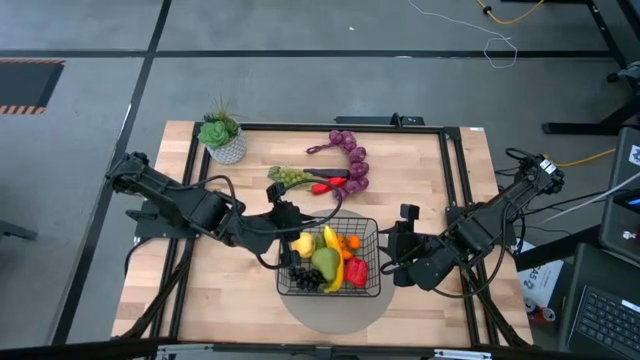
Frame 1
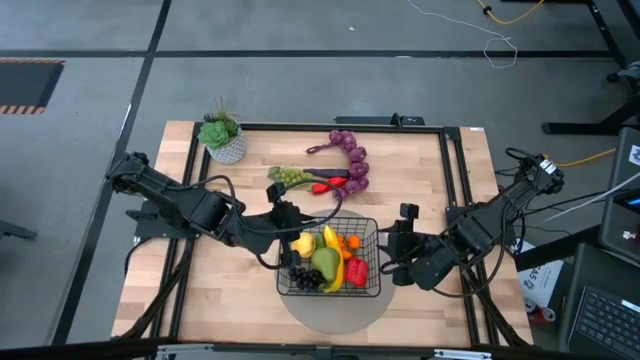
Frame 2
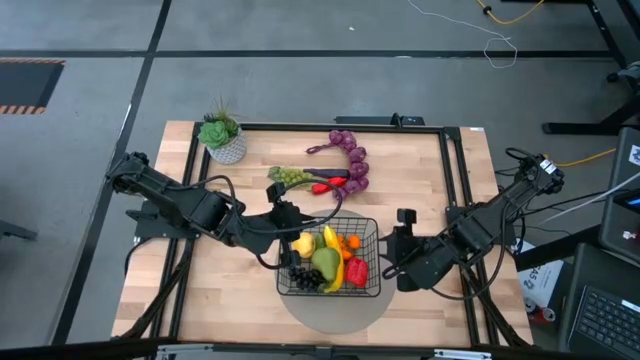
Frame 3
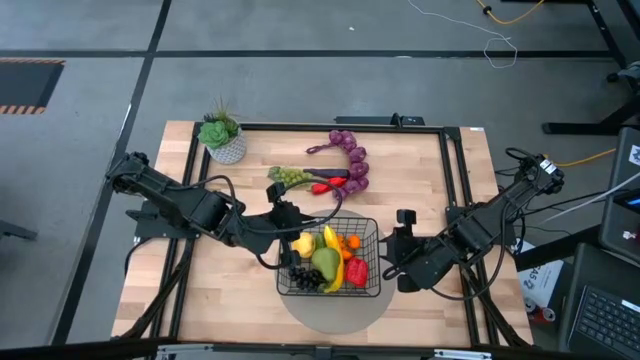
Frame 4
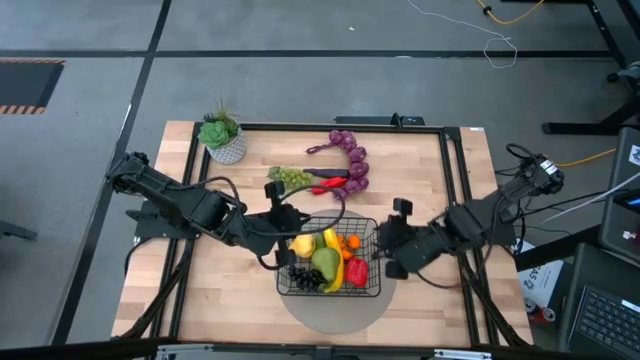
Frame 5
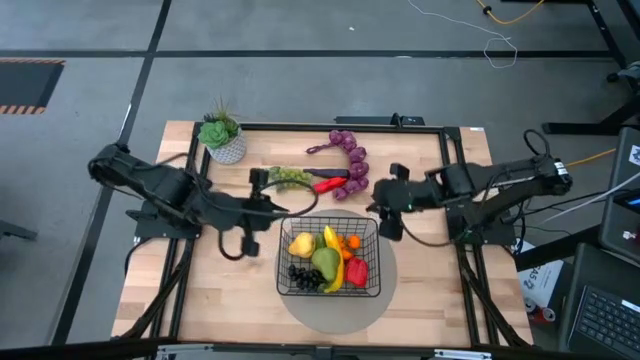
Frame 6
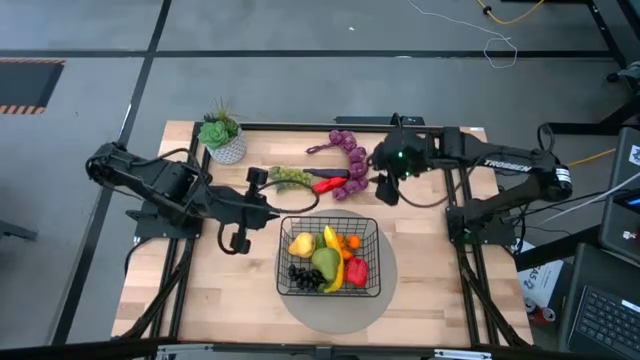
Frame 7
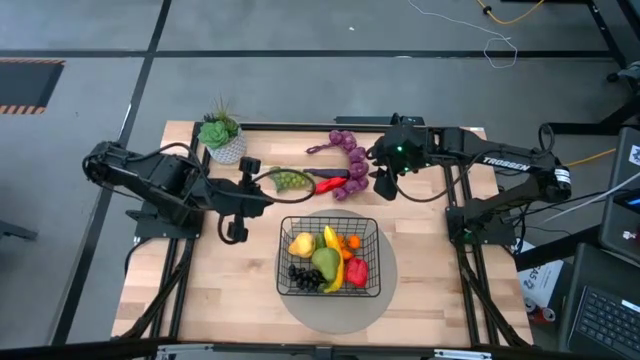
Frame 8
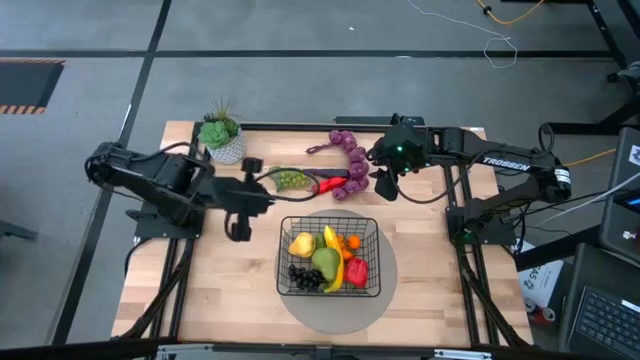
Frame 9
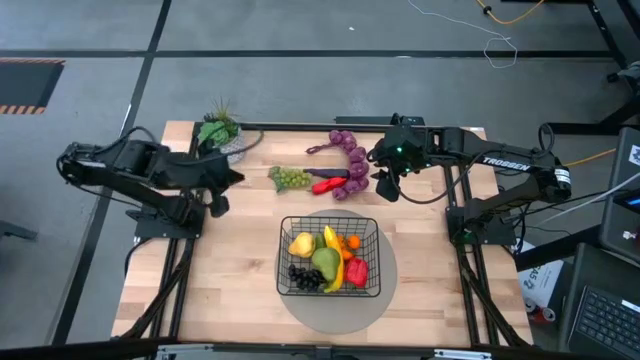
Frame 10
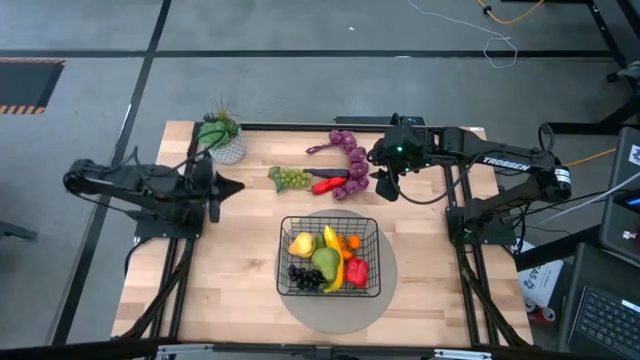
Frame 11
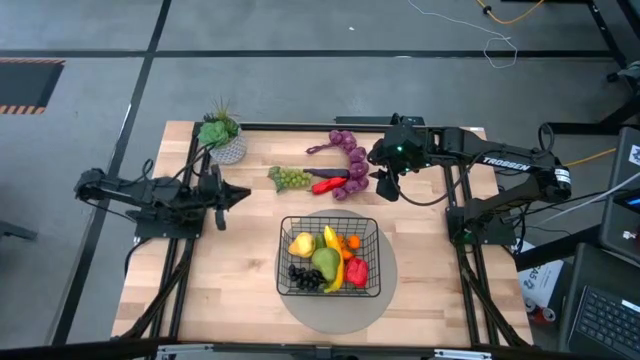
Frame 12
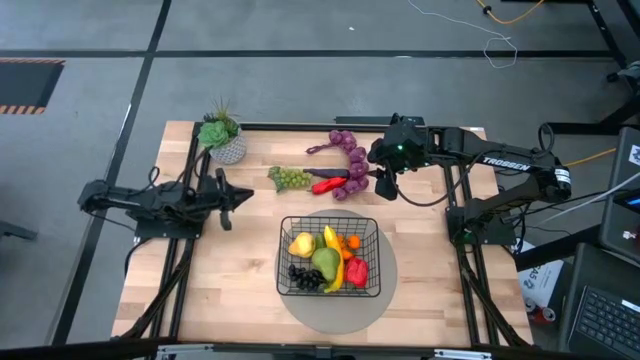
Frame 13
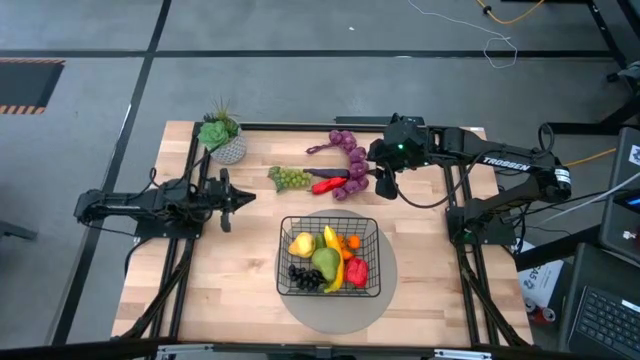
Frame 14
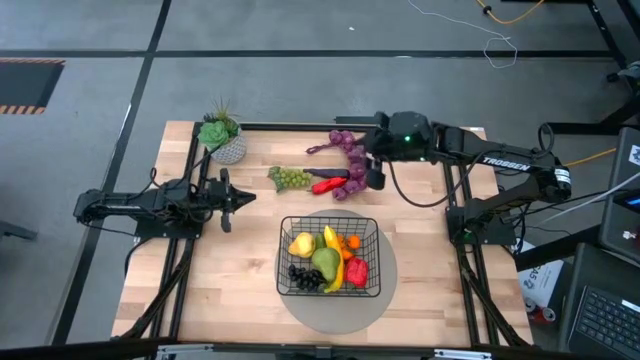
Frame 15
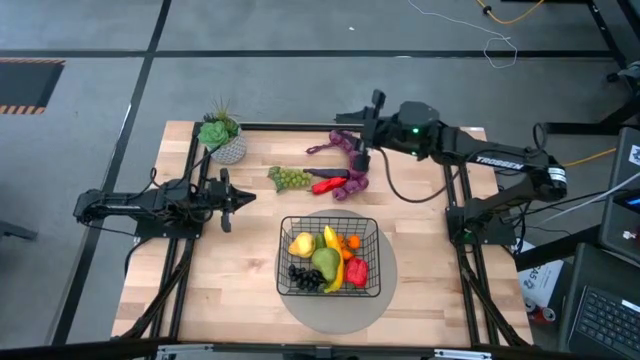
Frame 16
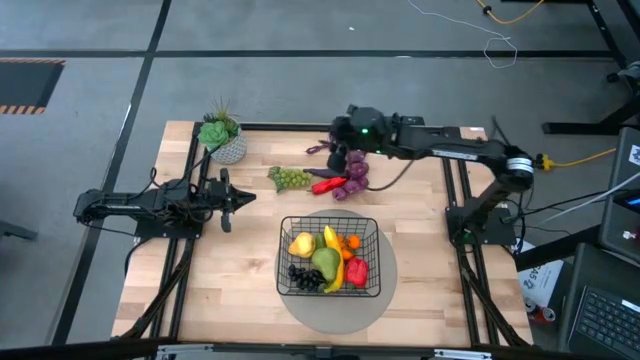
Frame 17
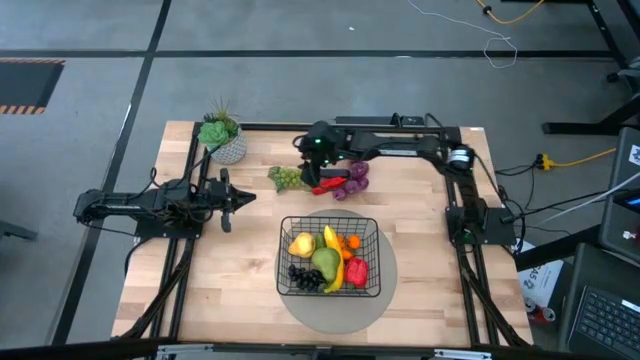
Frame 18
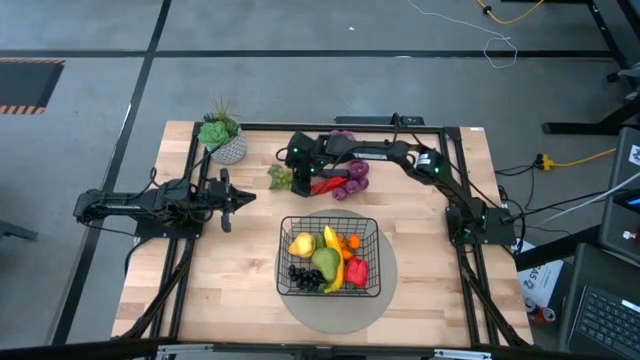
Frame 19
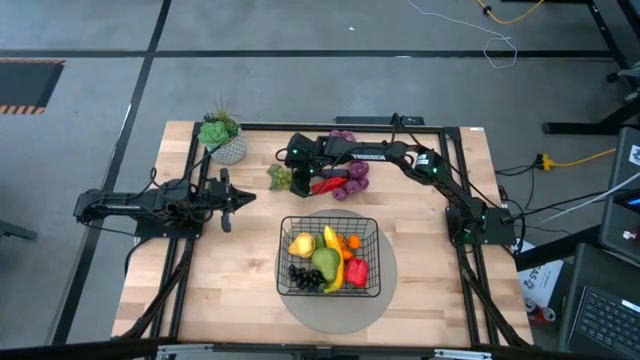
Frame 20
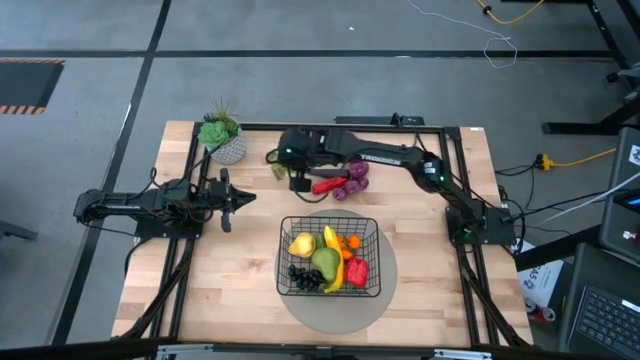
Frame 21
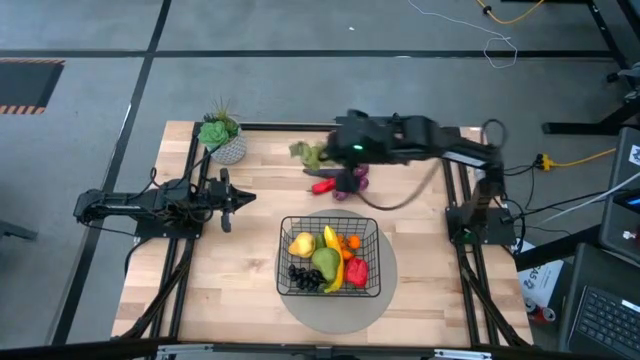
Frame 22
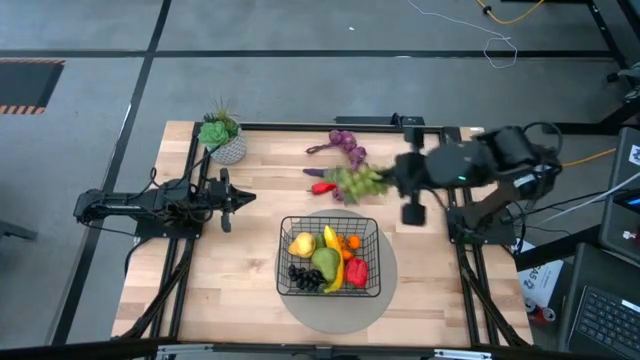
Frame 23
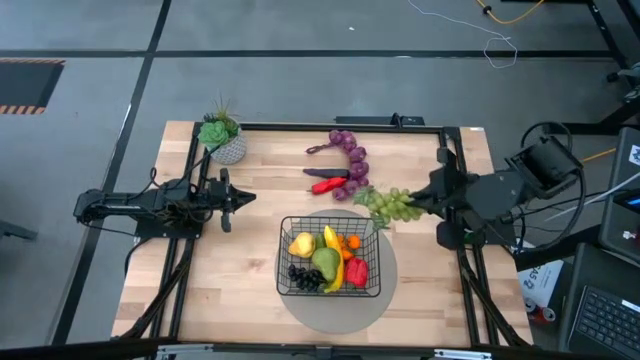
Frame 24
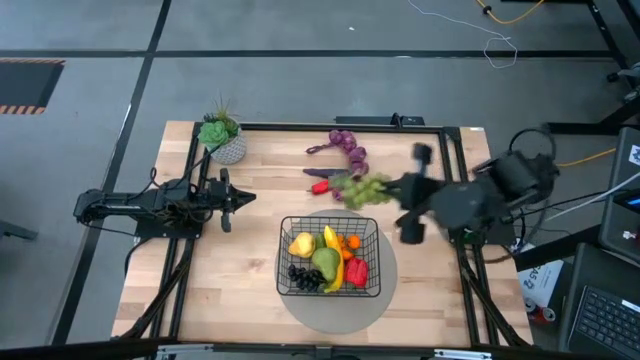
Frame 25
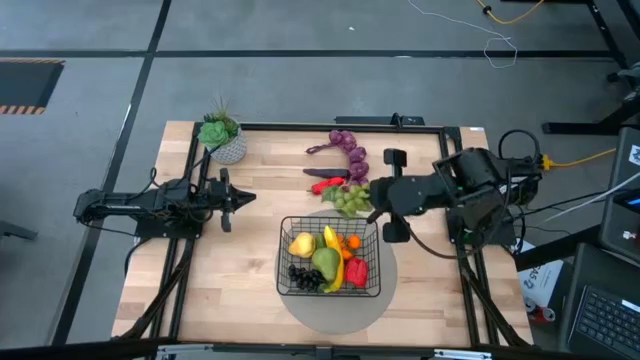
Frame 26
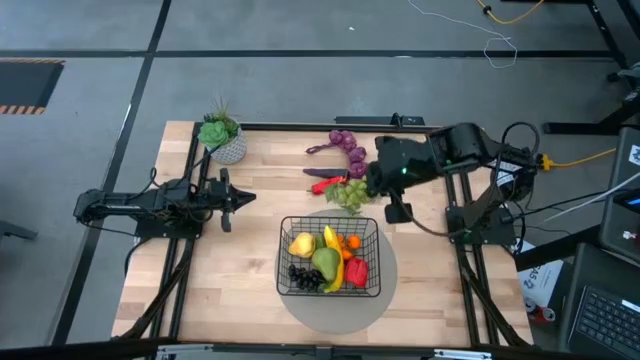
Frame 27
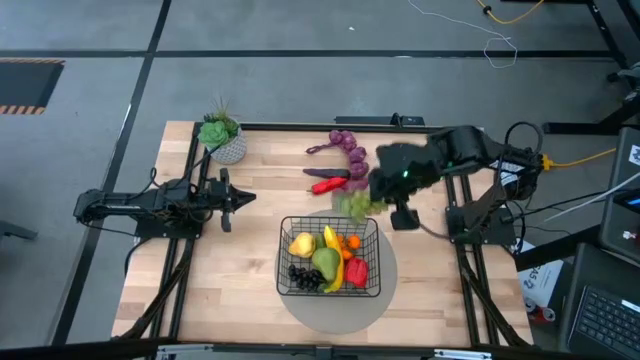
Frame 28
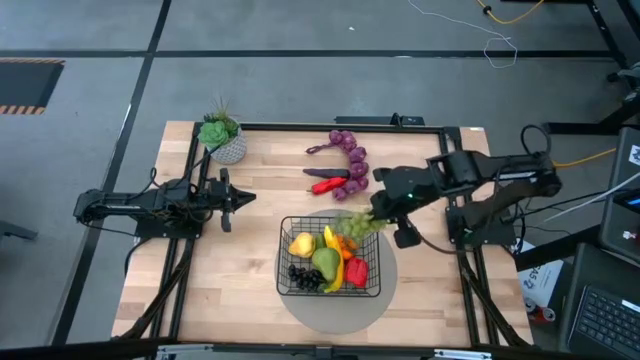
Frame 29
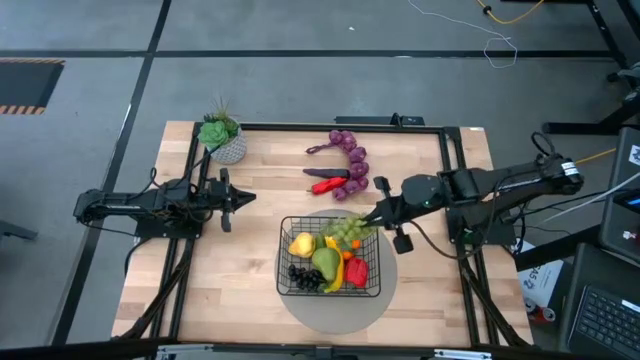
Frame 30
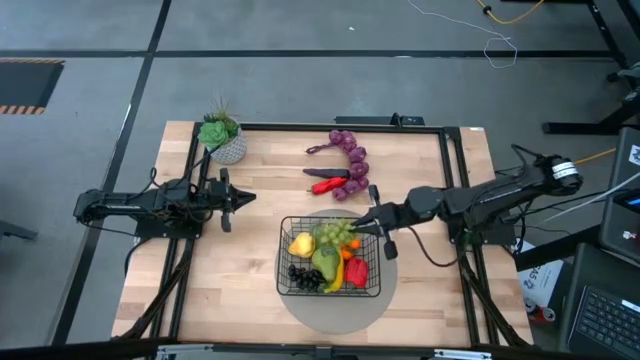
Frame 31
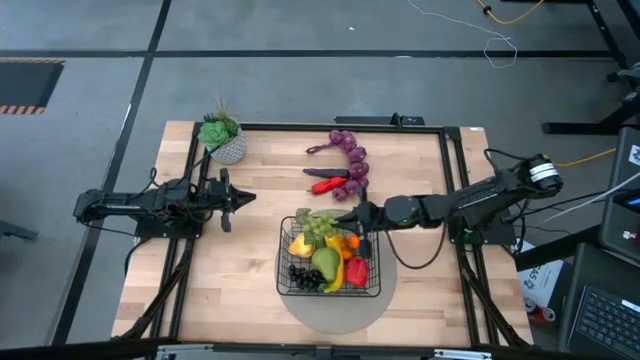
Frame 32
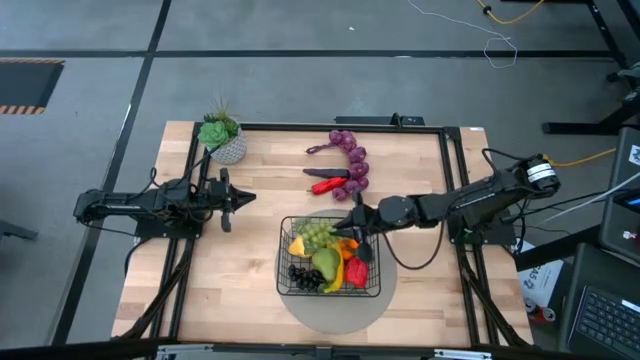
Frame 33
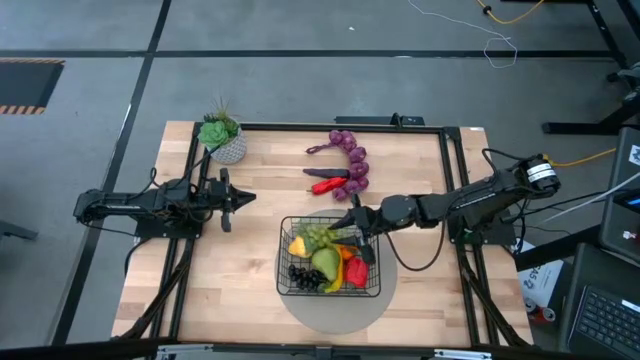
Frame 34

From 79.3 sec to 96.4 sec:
Task: Build produce basket
Put the green grapes into the wire basket

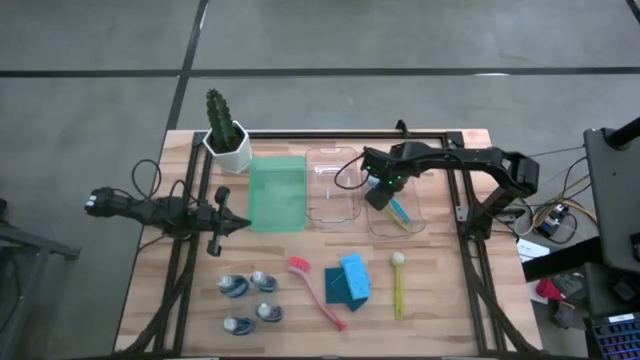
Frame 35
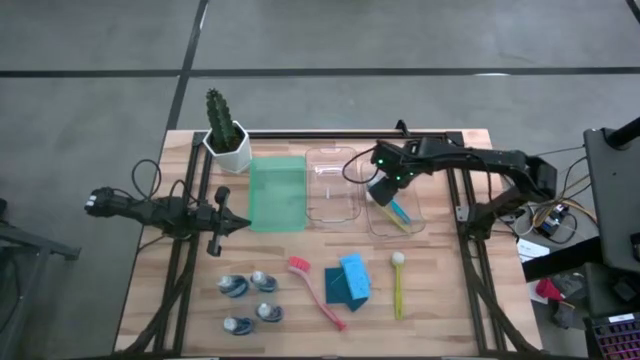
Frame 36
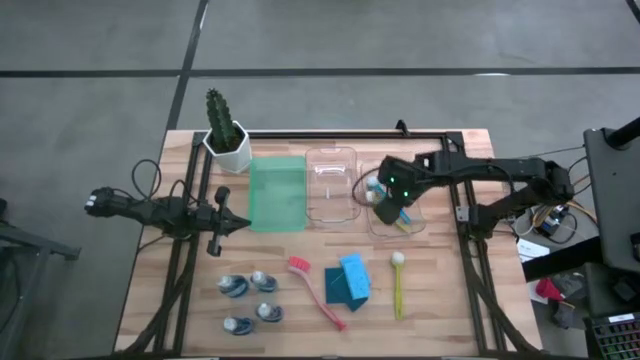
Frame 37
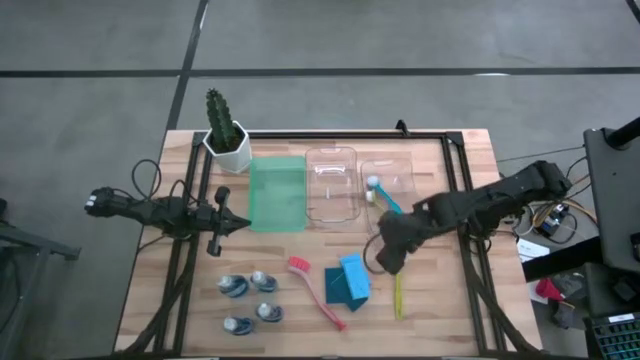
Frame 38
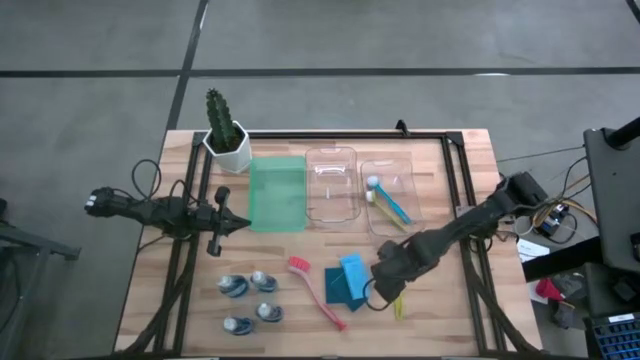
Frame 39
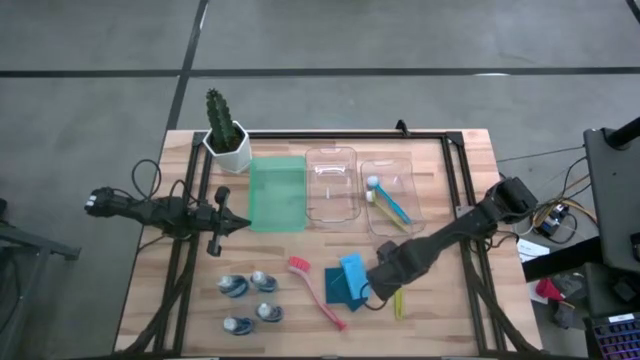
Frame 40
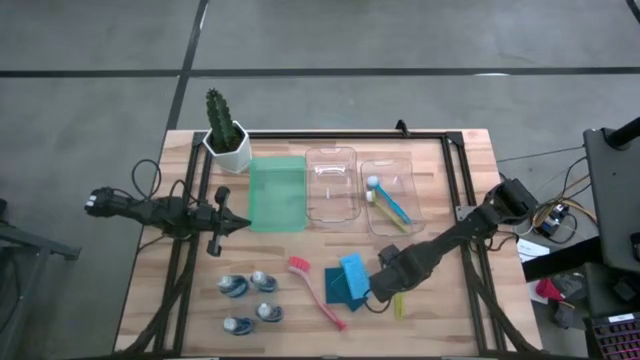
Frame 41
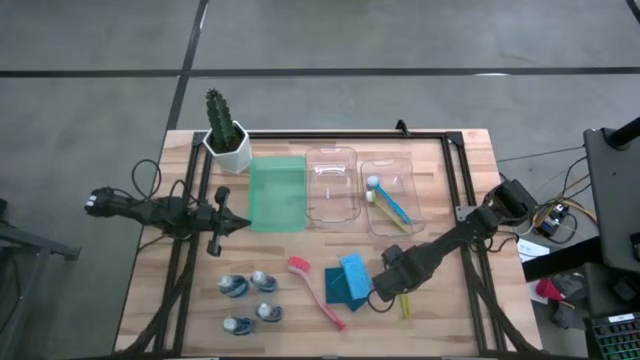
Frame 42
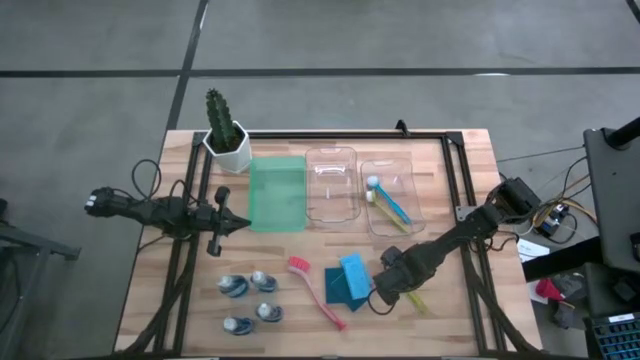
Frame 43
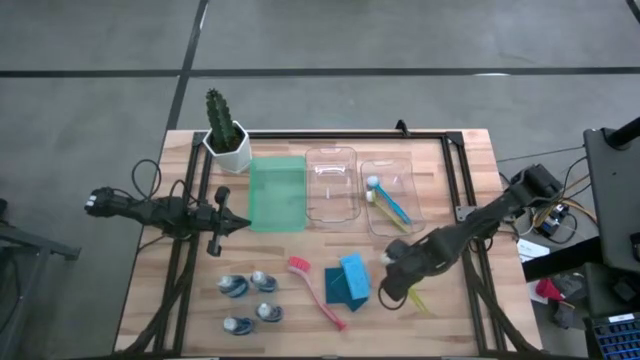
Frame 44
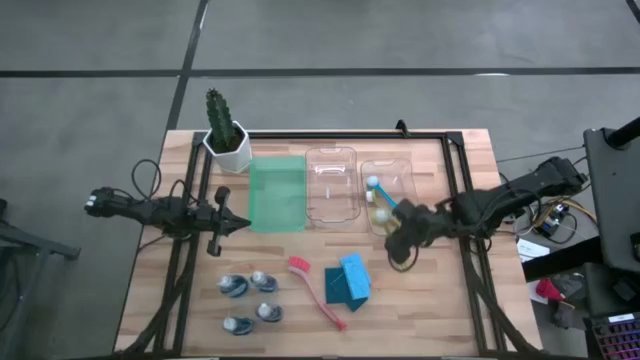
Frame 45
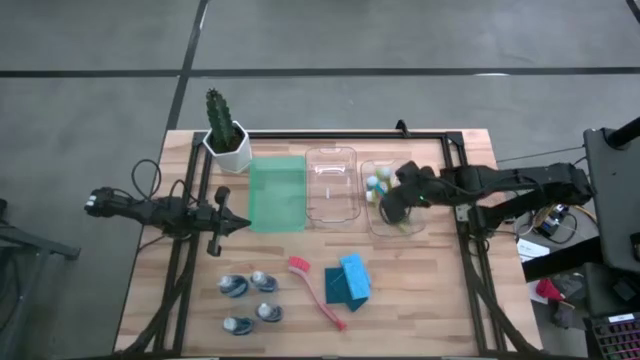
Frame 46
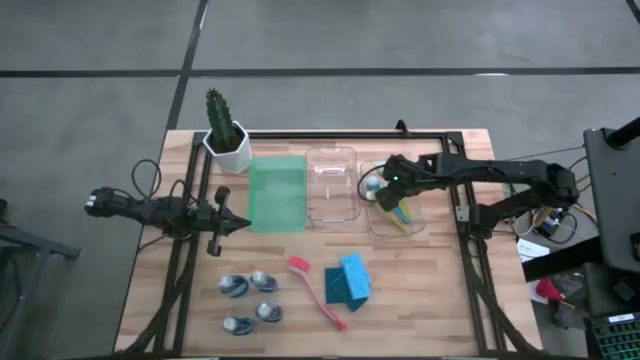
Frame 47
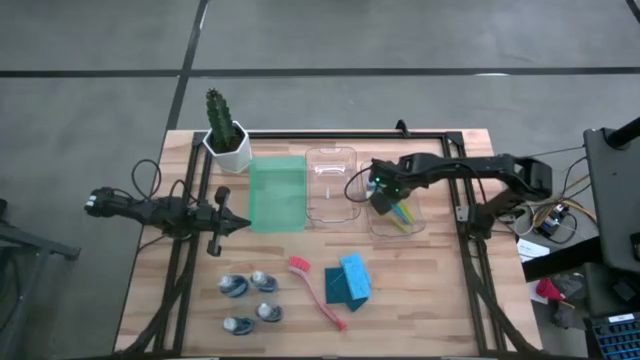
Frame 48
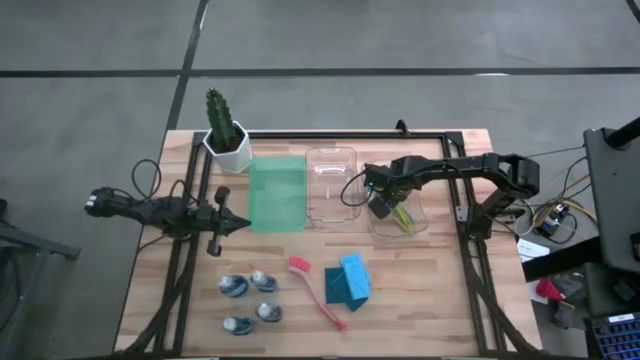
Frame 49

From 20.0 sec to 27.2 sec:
Task: Pick & Place Kitchen Sink Supplies
Put the green dish brush into the right transparent bin
